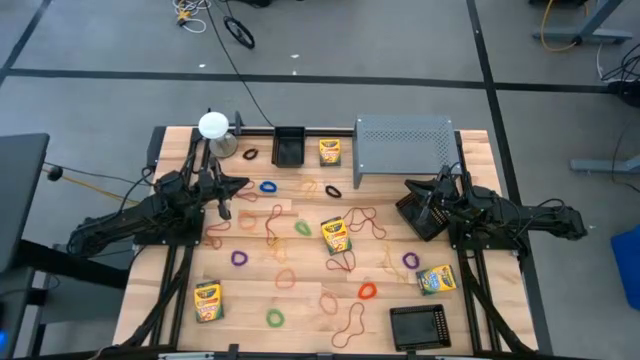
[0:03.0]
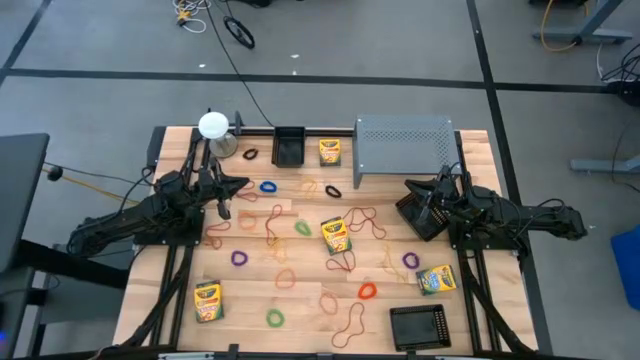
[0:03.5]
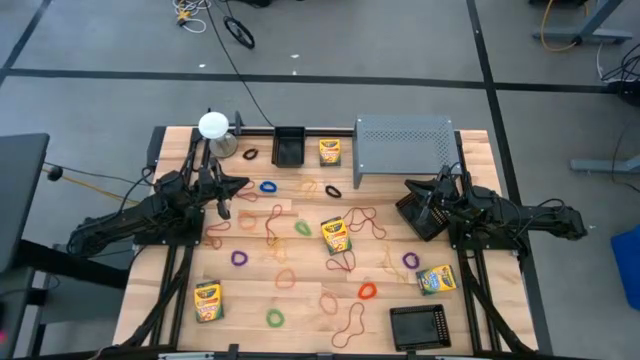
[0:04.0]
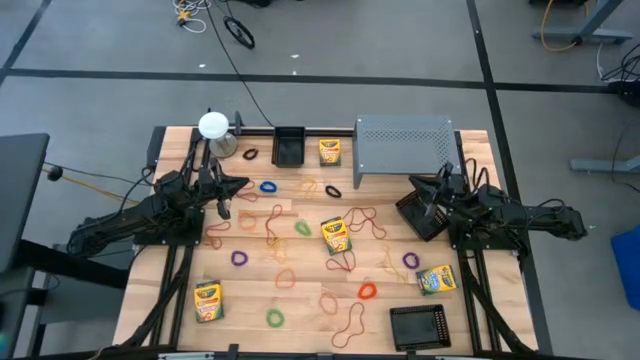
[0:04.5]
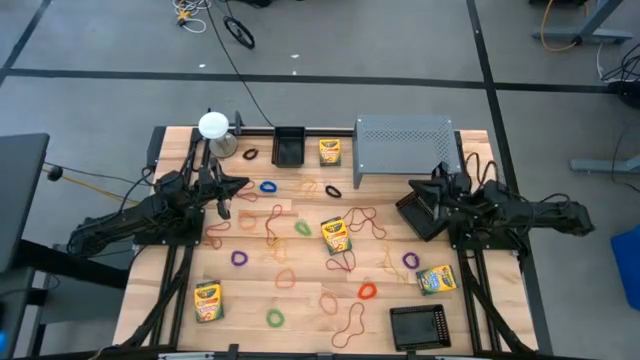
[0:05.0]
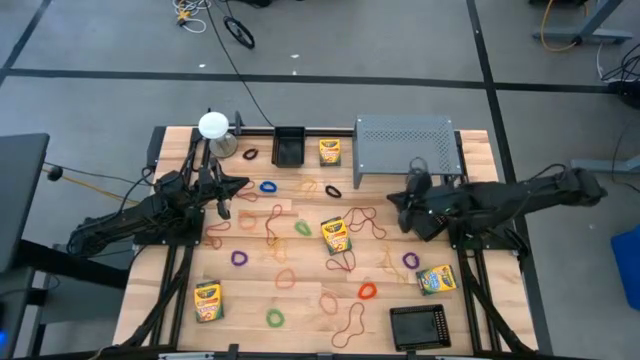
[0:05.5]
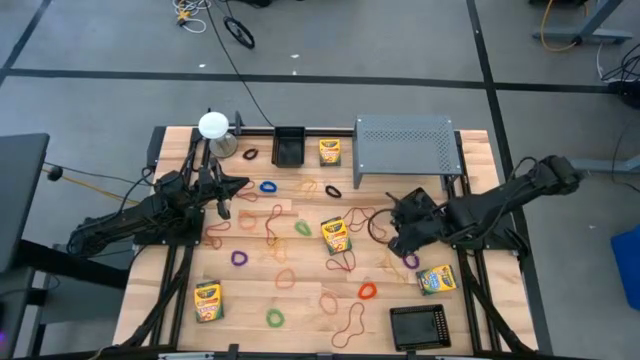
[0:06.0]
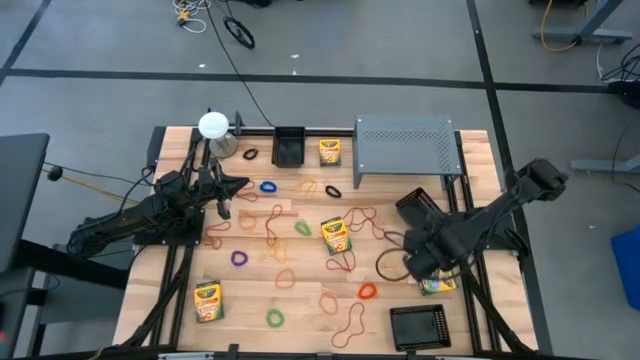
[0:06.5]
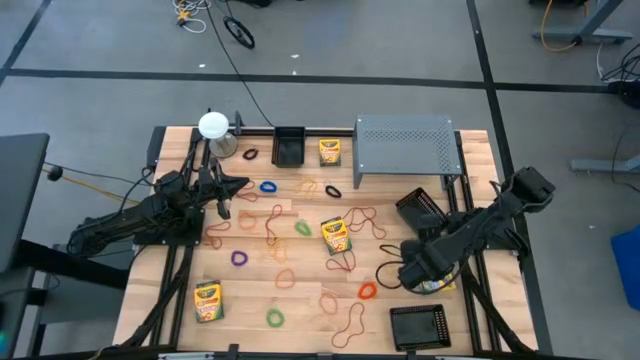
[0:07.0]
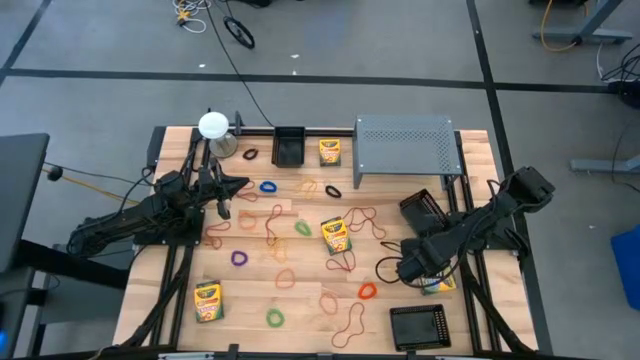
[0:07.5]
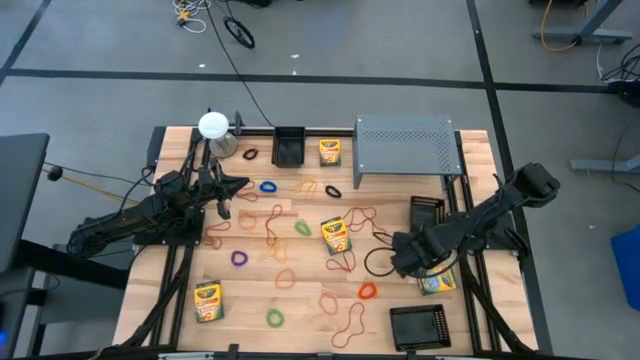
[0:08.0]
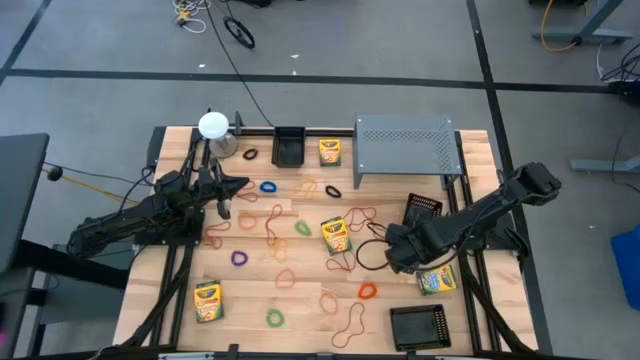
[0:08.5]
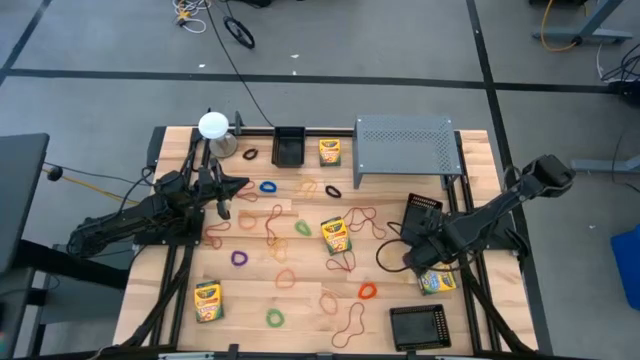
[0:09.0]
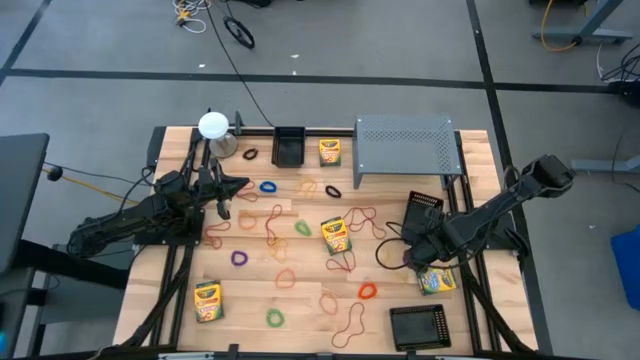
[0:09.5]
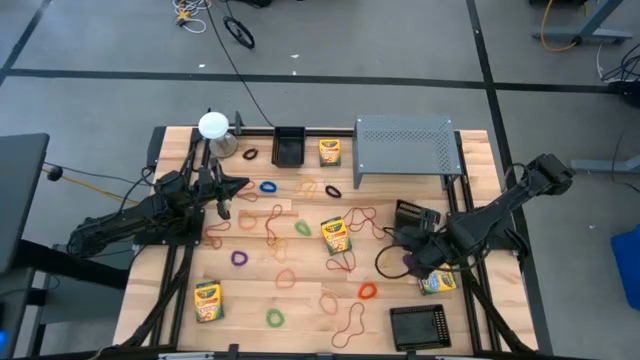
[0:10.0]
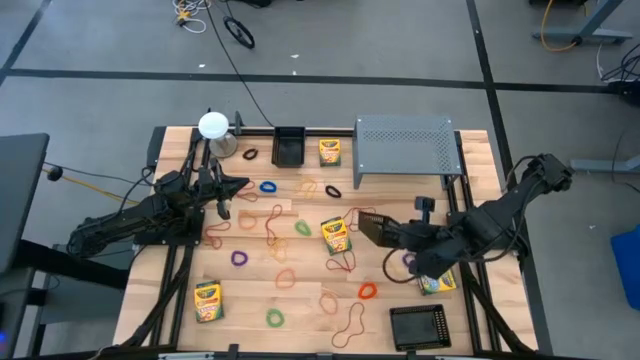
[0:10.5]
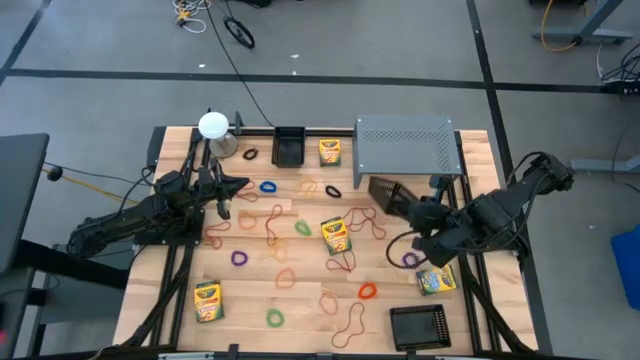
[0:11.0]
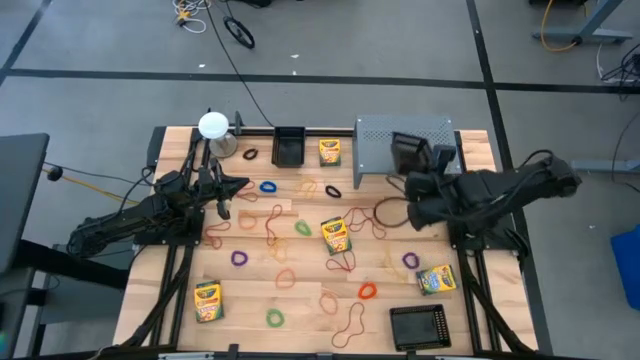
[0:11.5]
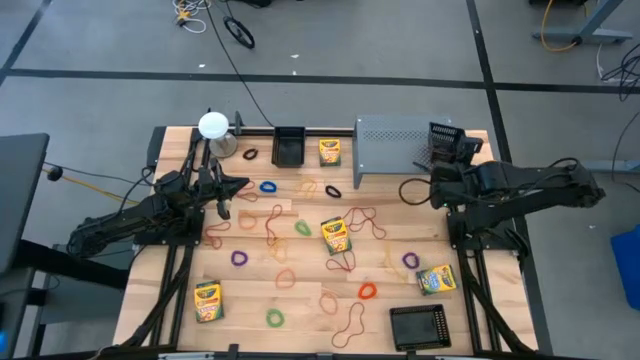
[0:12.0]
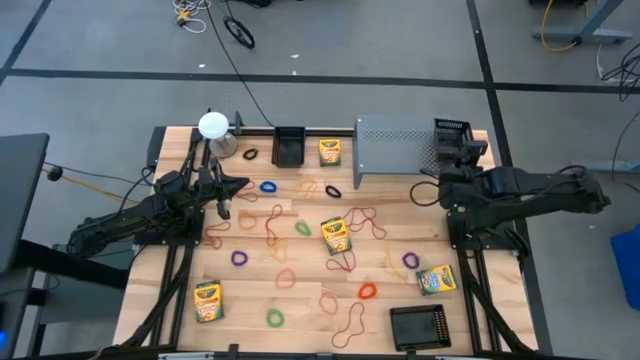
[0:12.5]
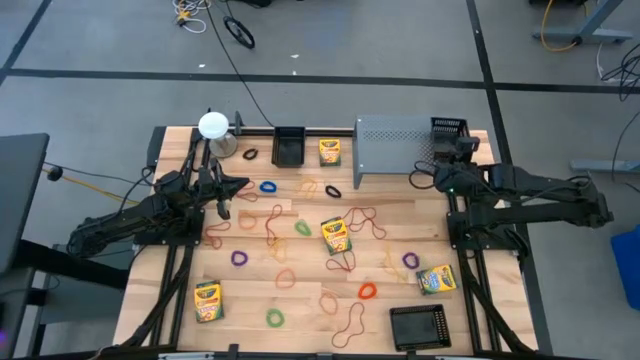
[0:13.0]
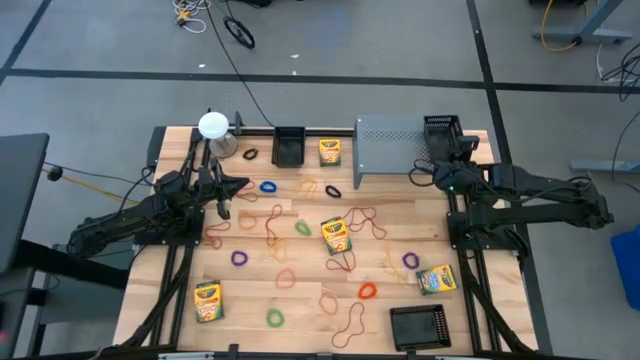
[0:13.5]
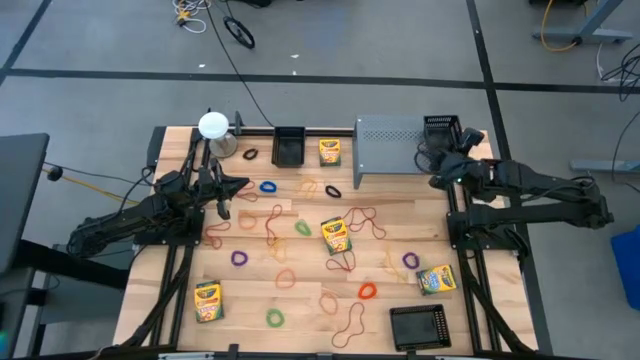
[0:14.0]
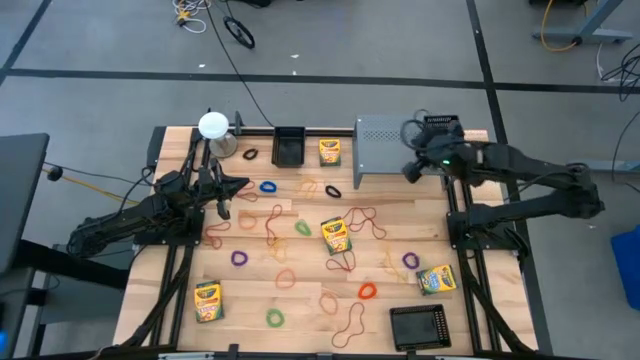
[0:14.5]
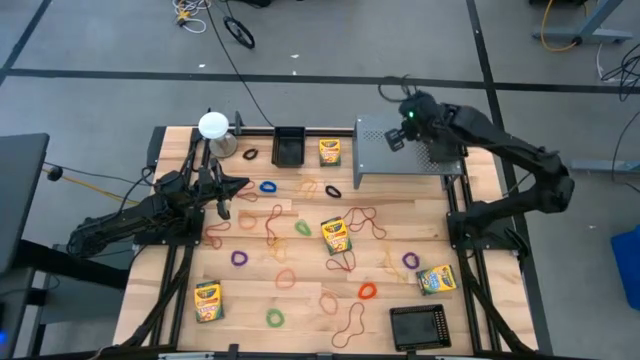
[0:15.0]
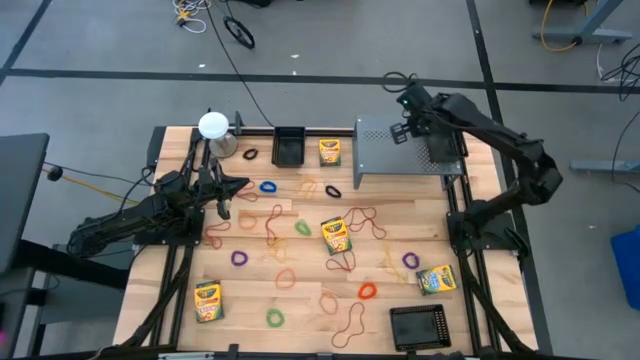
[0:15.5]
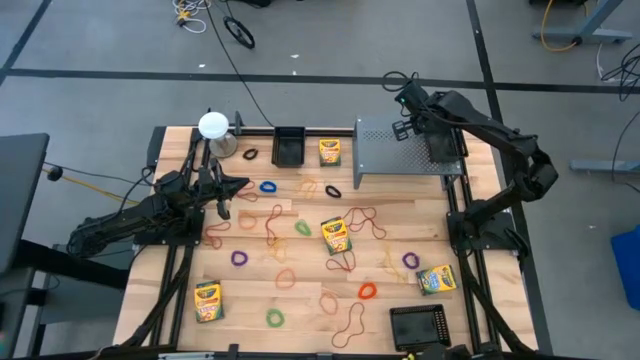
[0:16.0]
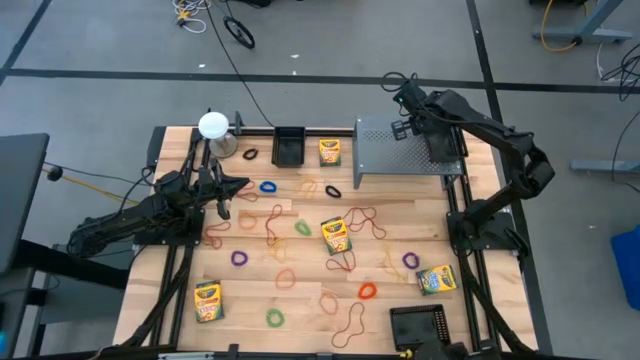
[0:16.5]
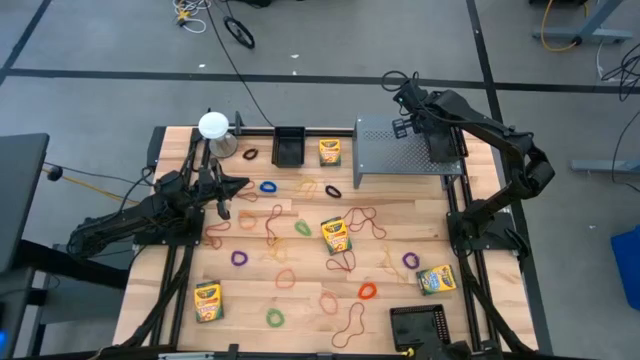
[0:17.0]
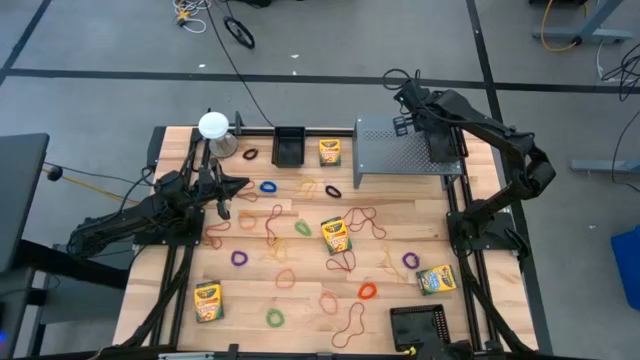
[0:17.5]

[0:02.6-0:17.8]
Task: Pick & Place Office Desk Supplies
Put the middle black bin to the shelf

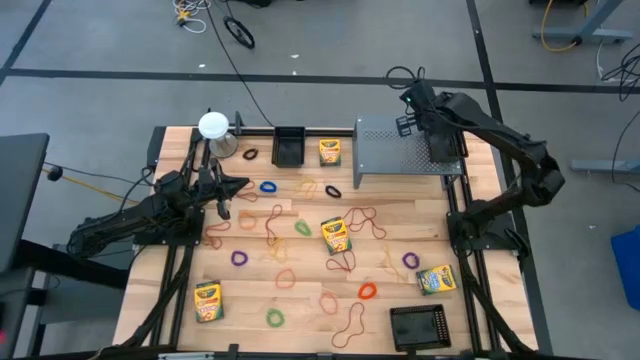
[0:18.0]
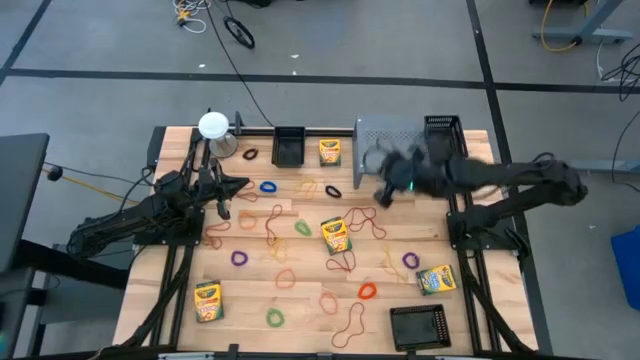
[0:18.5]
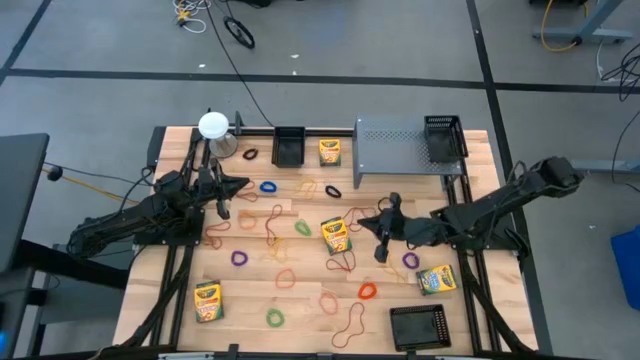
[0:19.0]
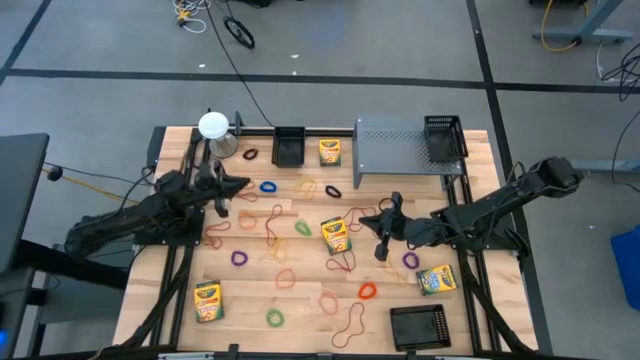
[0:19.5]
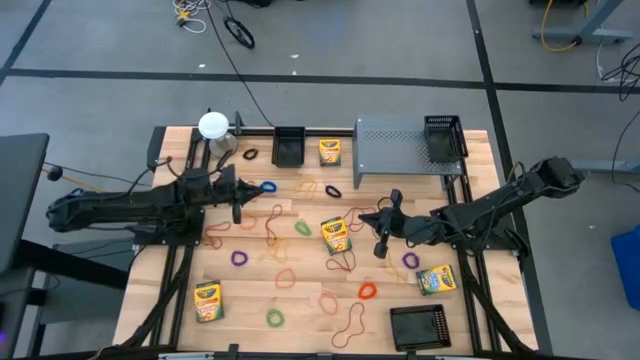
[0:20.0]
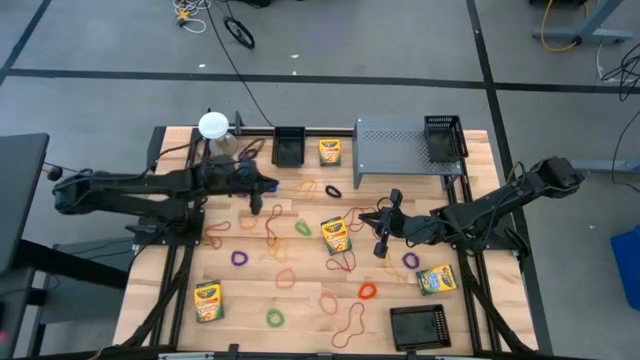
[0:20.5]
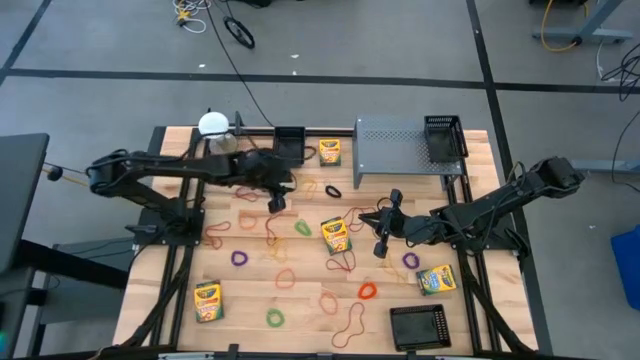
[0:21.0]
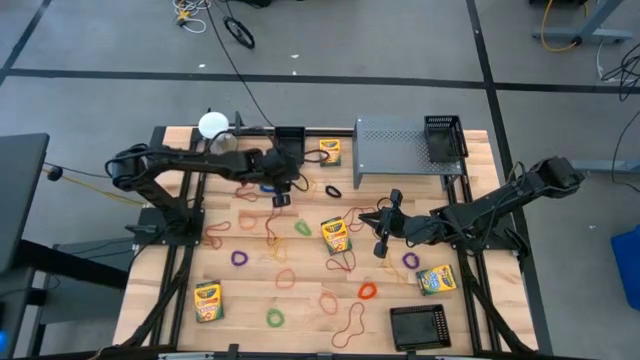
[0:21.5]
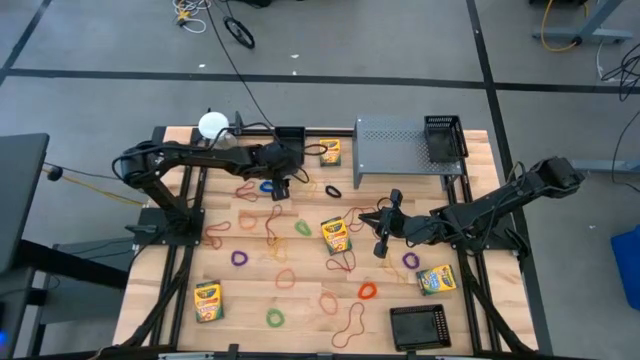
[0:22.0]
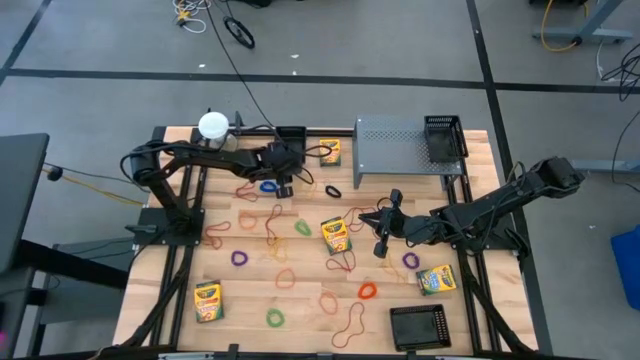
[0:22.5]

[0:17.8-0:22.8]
Put the top black bin on the shelf
